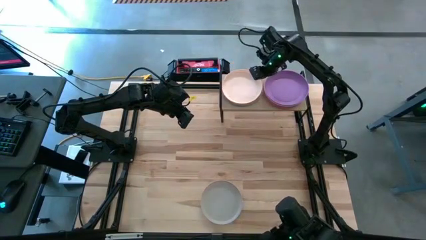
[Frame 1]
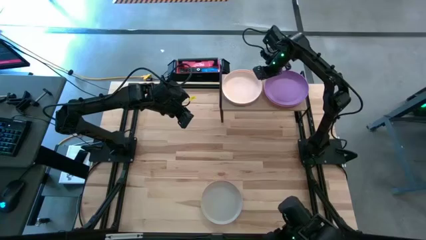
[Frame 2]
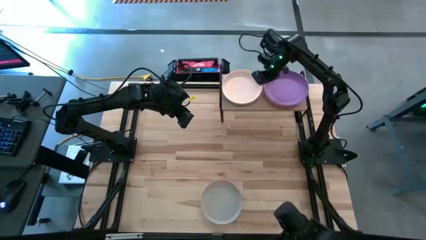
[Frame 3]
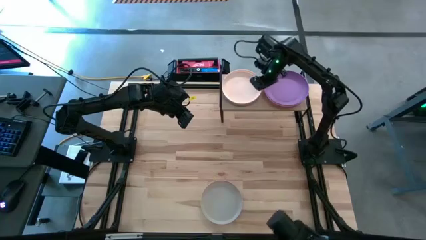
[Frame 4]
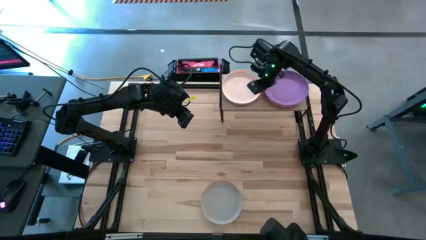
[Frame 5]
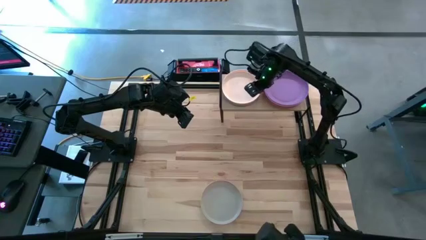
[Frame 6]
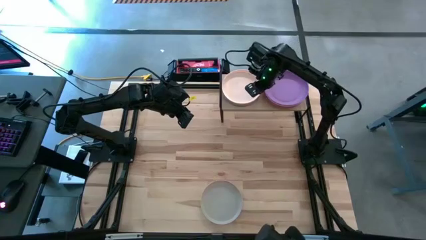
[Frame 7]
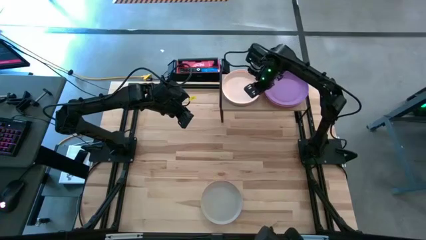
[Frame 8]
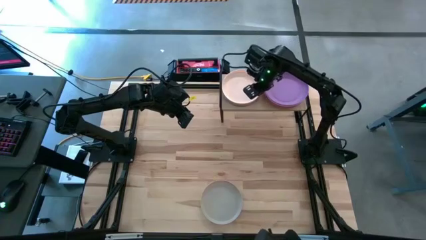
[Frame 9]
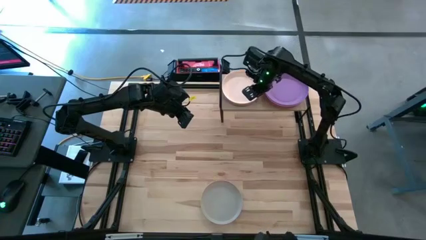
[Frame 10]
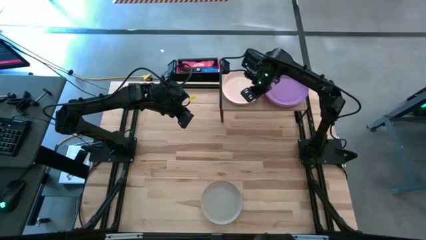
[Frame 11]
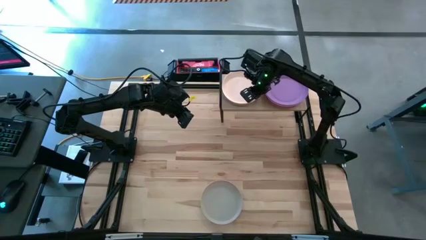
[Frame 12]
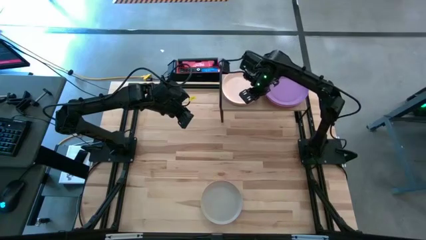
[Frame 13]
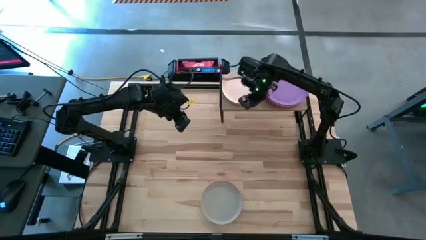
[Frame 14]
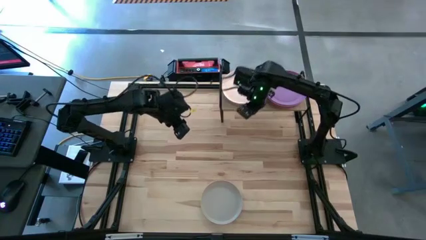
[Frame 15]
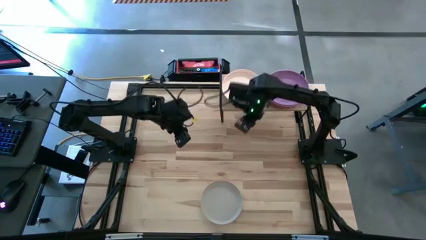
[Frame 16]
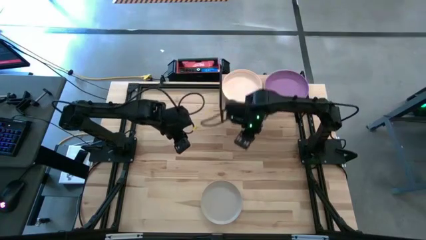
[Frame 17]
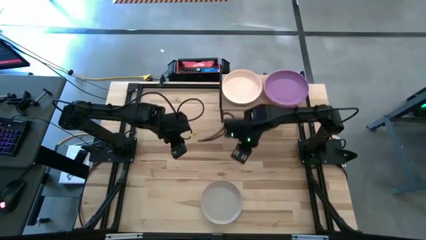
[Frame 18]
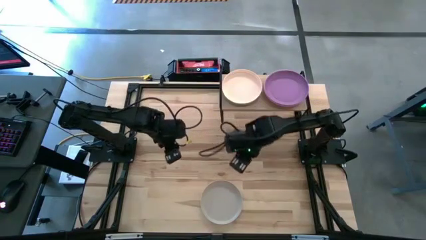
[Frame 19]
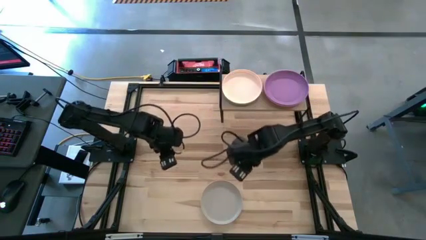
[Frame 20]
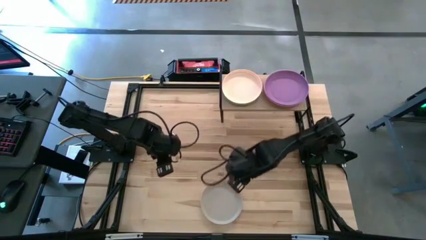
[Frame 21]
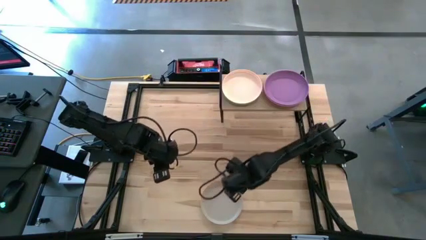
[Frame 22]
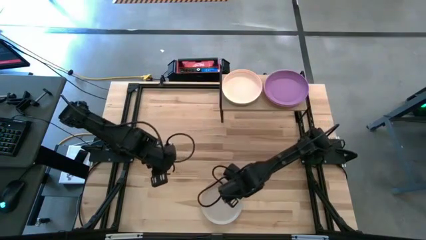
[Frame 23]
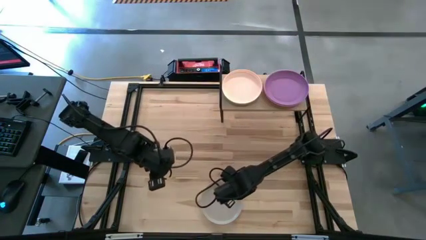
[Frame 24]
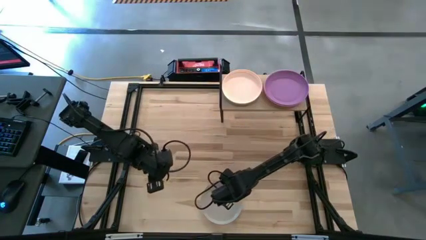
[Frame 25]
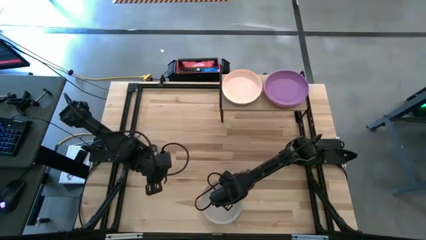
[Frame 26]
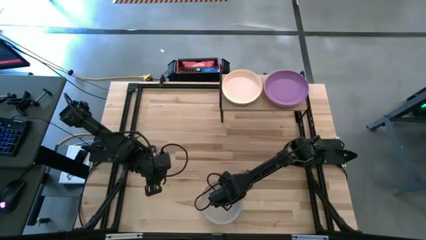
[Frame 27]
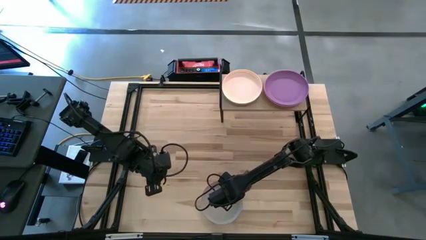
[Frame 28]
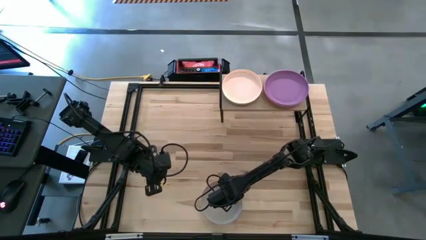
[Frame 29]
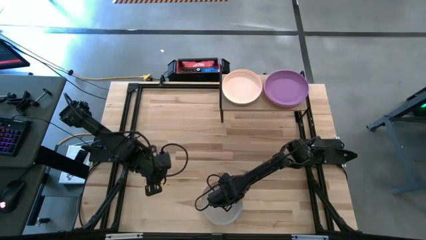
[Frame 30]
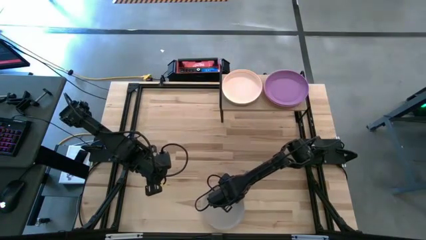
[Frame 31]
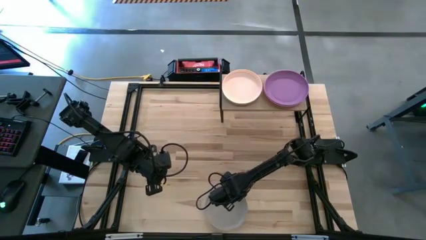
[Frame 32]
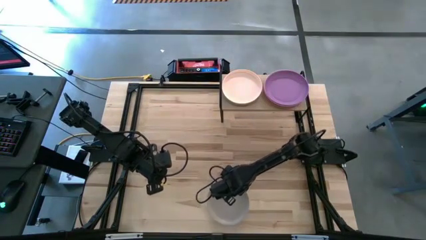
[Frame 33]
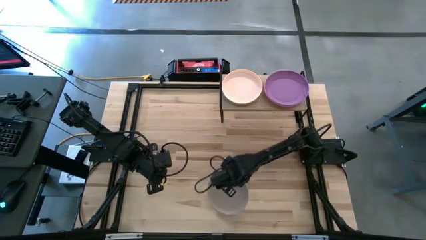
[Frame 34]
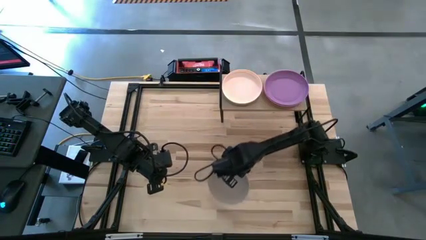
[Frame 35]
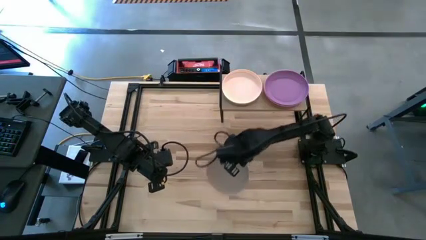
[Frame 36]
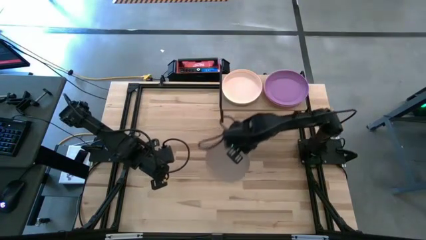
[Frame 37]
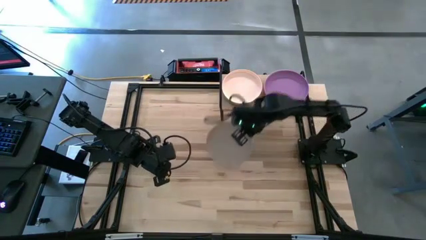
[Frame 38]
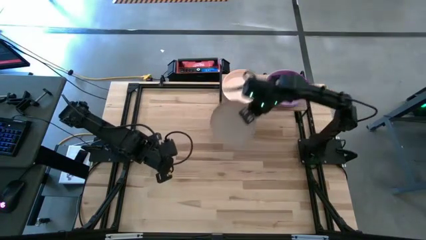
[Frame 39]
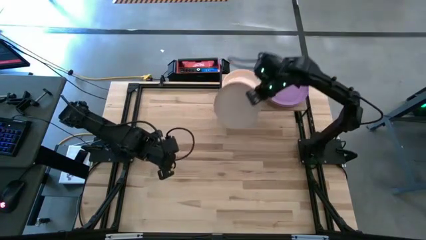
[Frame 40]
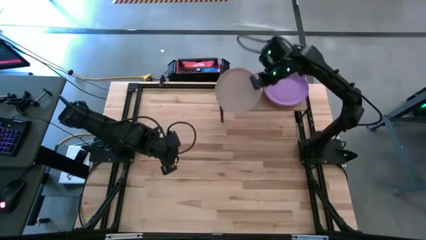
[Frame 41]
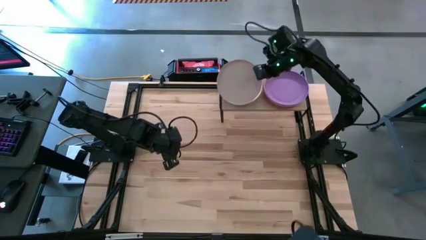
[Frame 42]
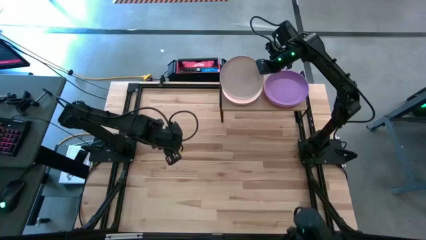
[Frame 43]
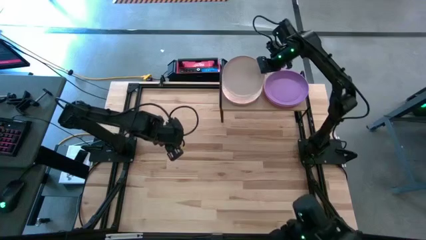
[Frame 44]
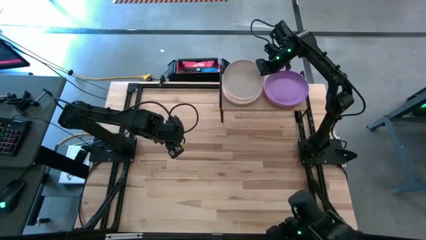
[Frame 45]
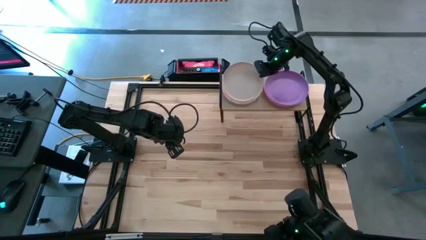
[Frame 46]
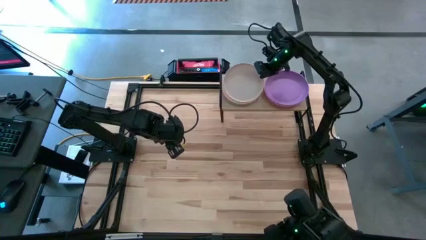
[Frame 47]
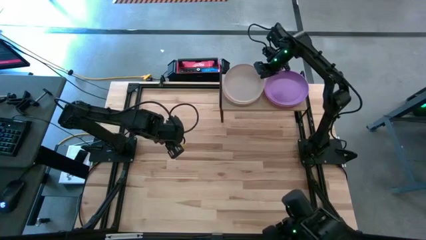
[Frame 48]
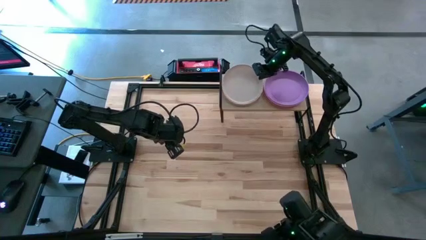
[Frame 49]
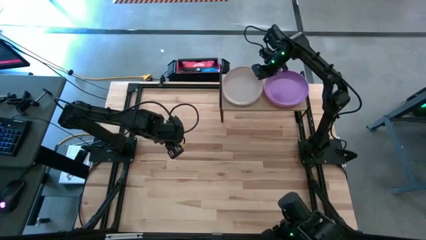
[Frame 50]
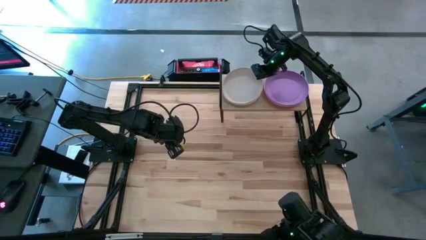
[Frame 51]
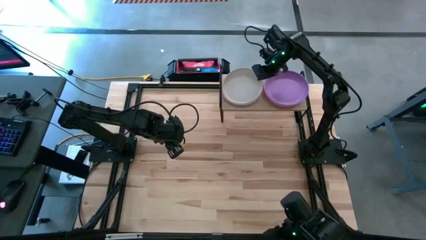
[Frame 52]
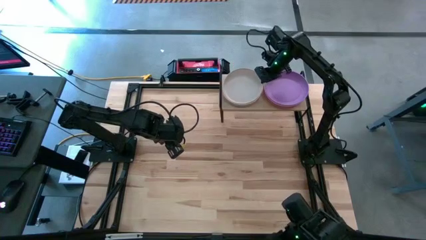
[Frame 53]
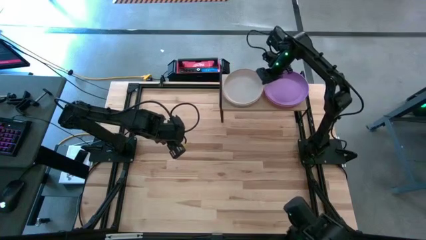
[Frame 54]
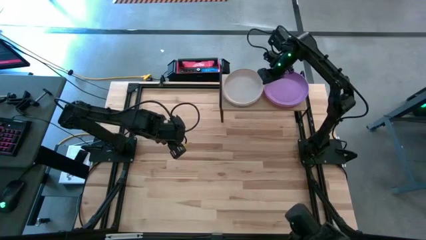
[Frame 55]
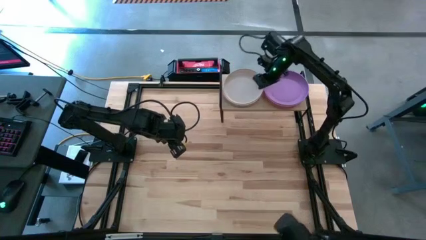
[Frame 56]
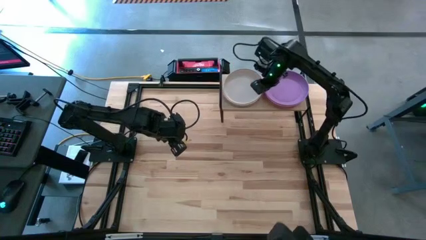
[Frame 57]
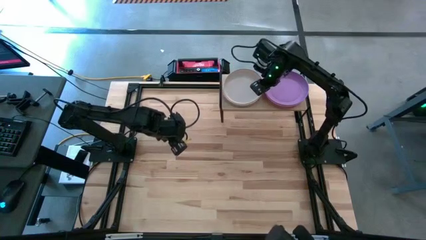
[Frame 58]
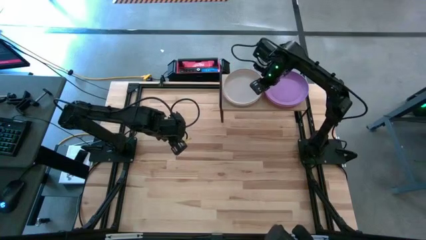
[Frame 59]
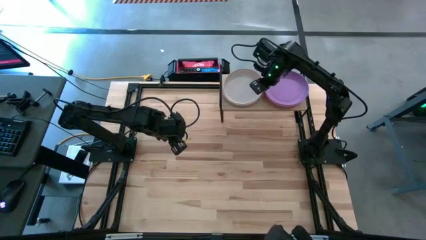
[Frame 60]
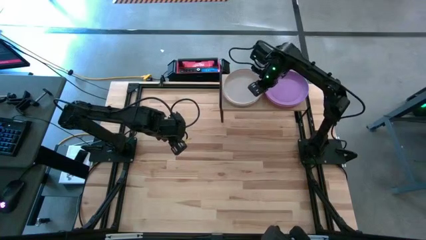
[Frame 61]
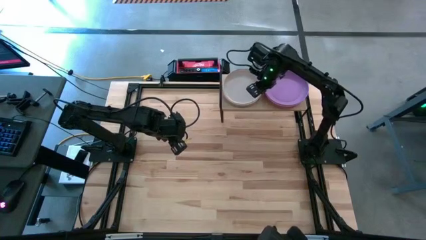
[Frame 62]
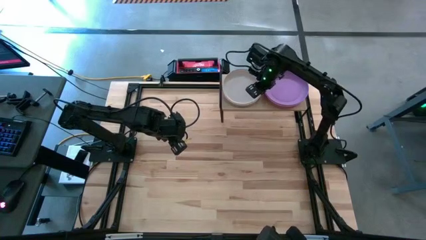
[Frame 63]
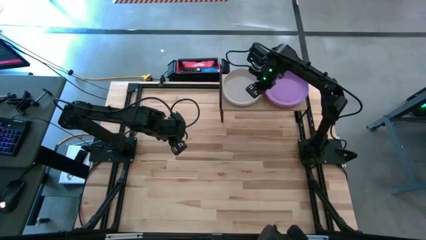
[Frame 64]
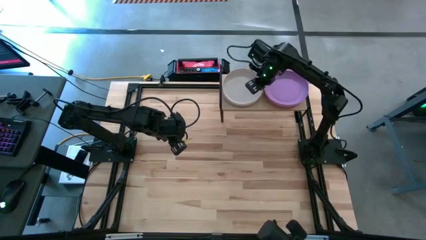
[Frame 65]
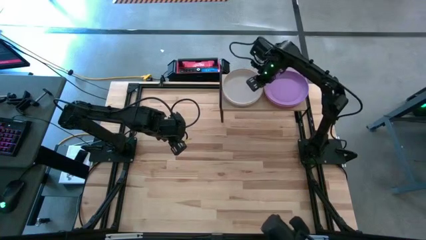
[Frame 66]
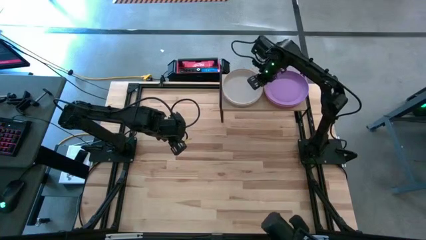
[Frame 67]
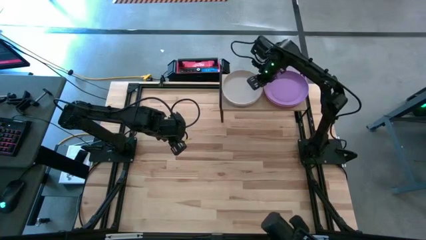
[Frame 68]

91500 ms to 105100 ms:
Task: Place and stack plates onto a shelf
Stack the gray plate on top of the beige plate on the shelf
